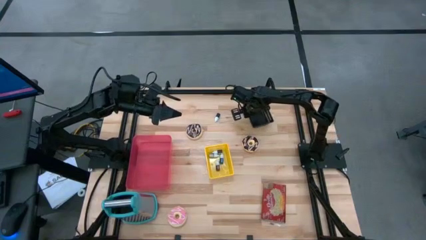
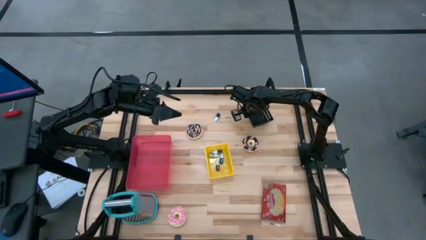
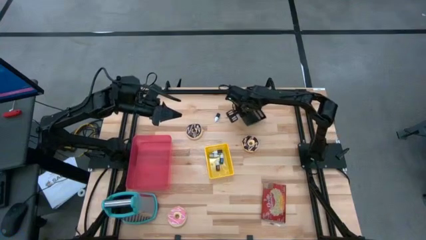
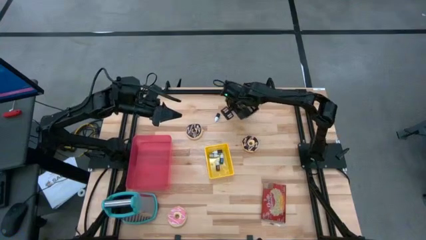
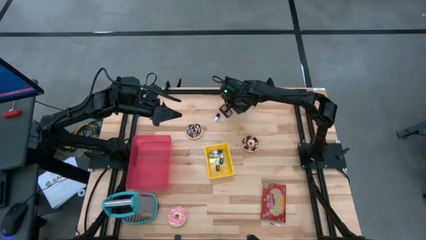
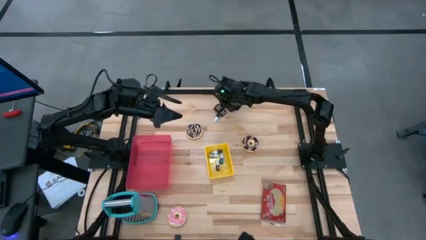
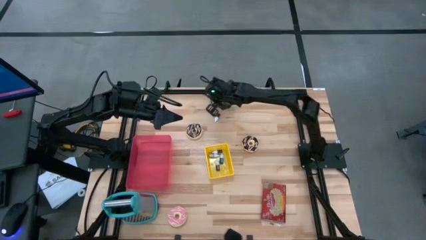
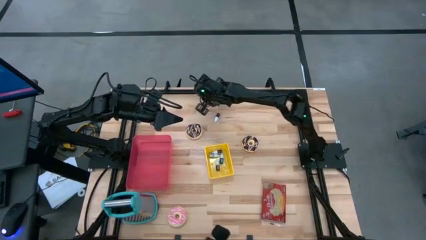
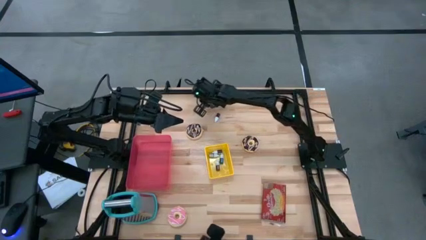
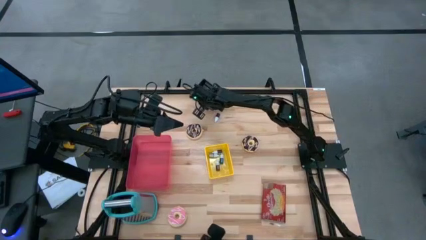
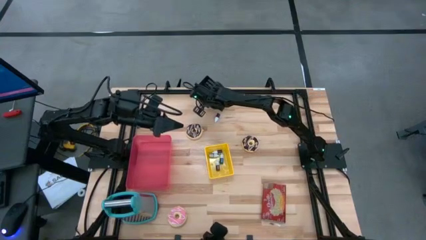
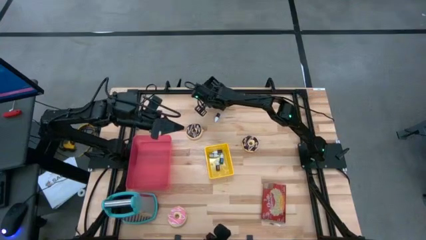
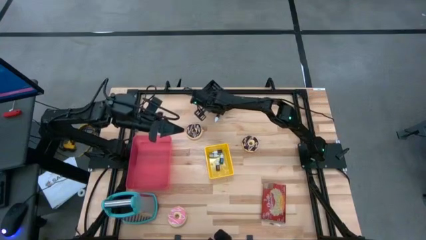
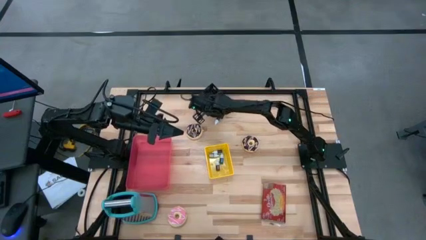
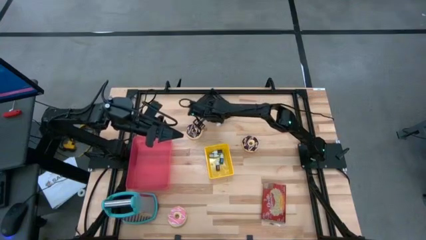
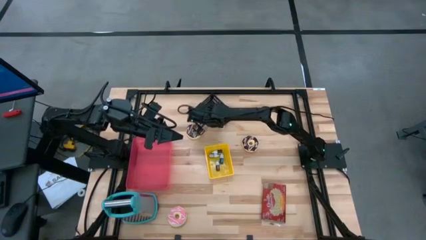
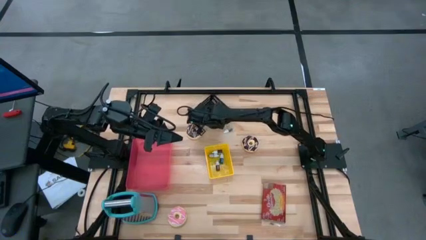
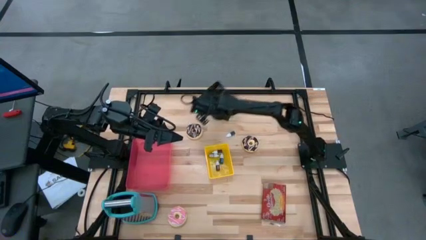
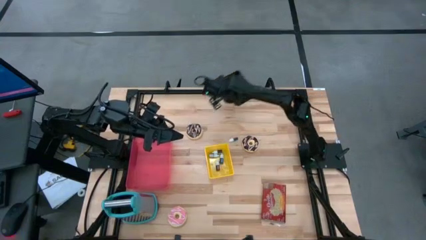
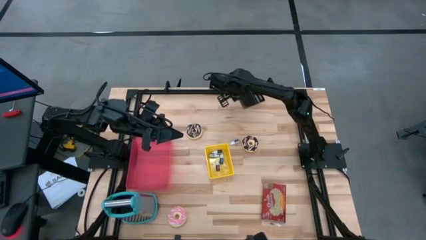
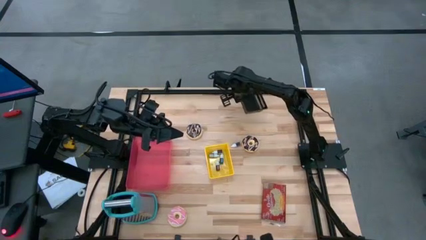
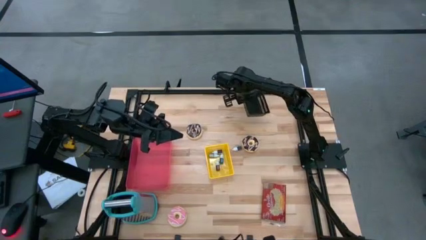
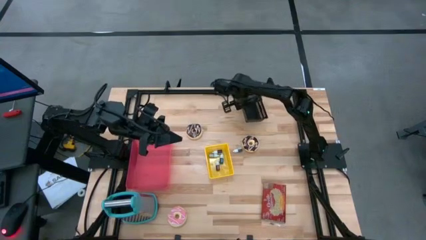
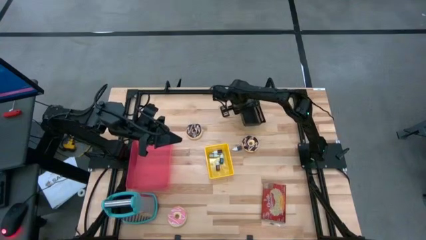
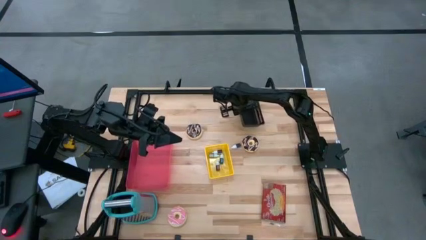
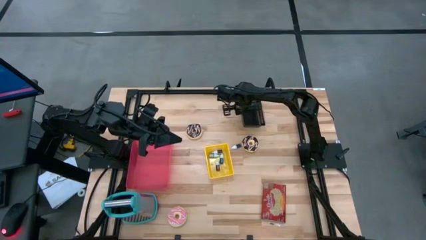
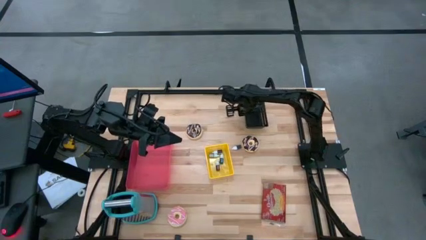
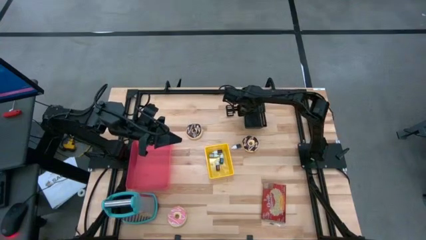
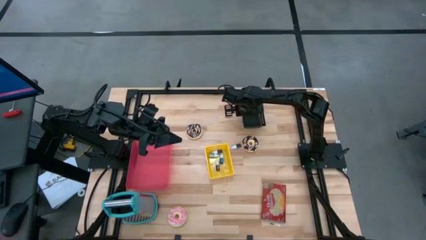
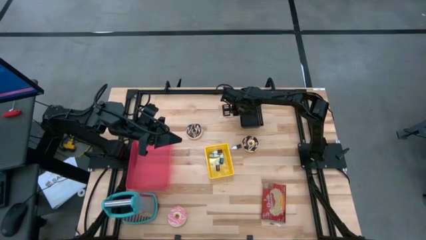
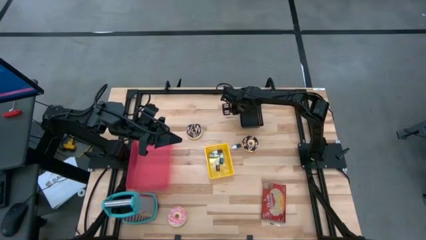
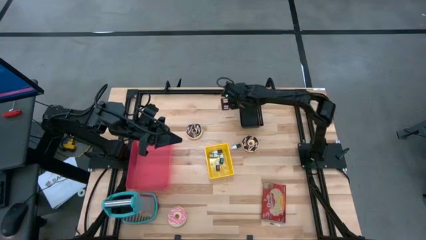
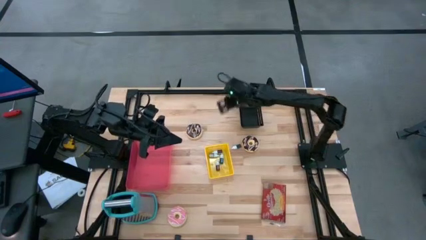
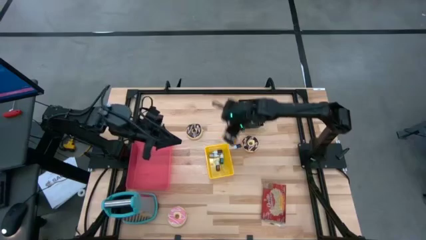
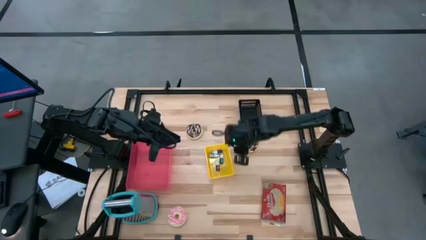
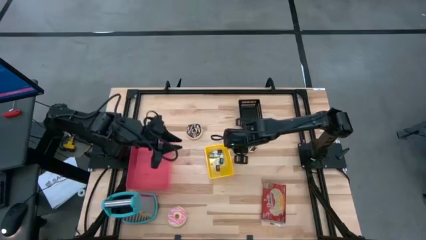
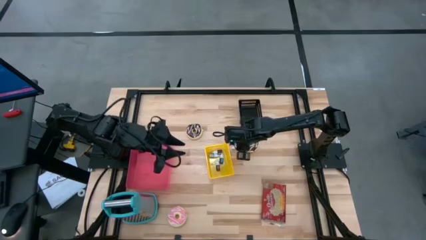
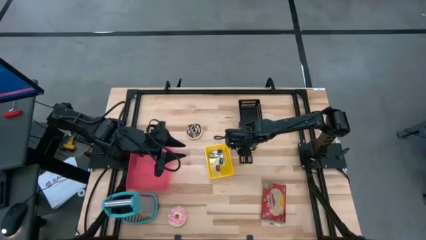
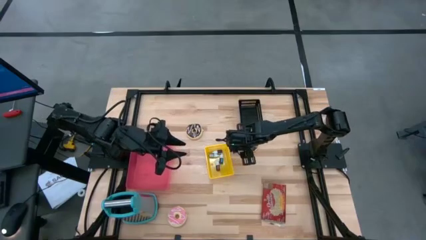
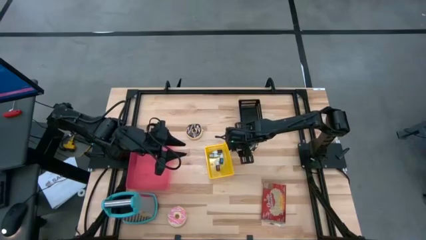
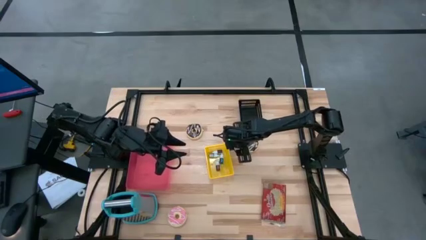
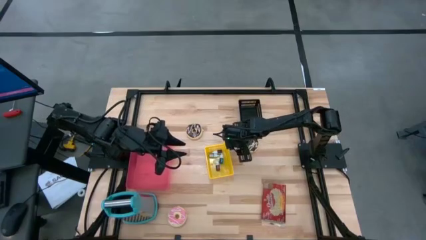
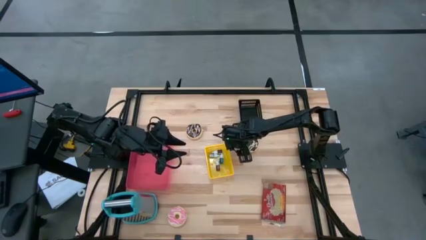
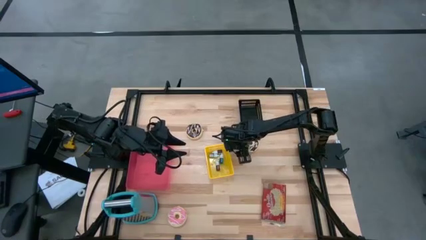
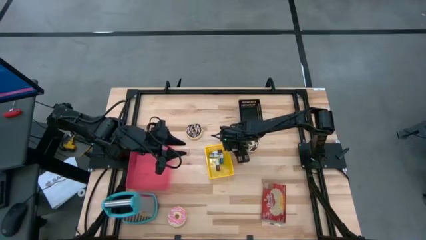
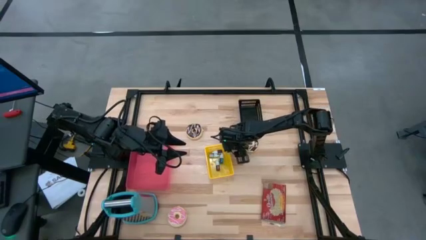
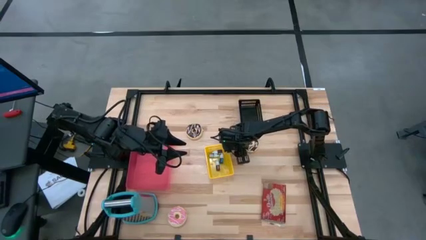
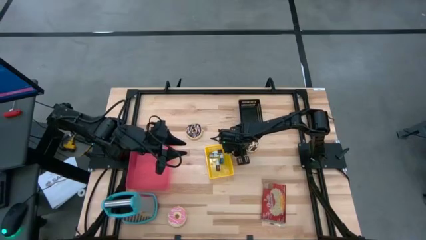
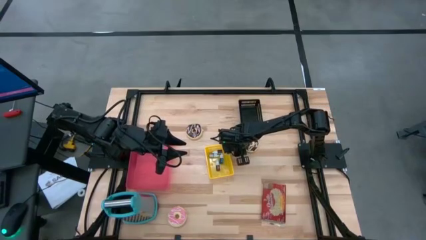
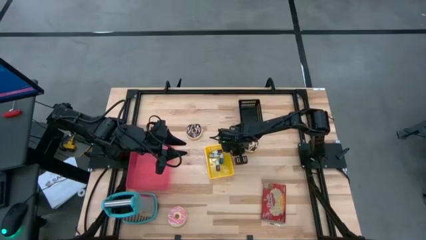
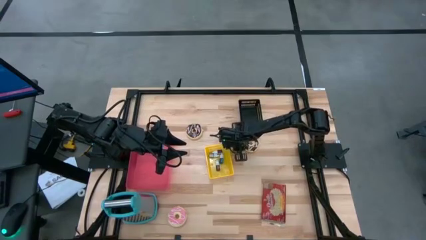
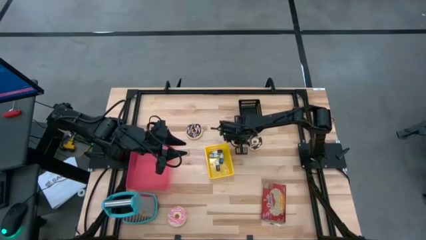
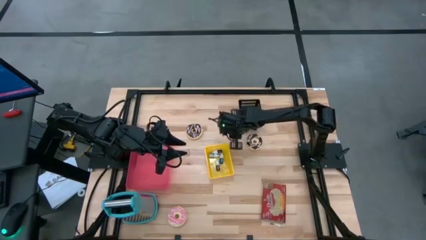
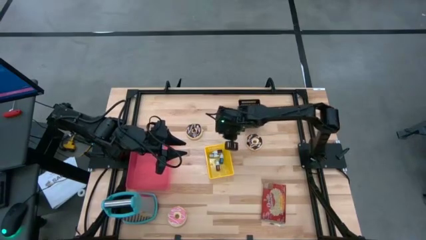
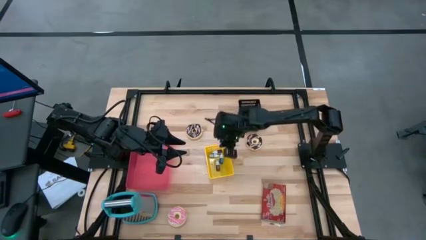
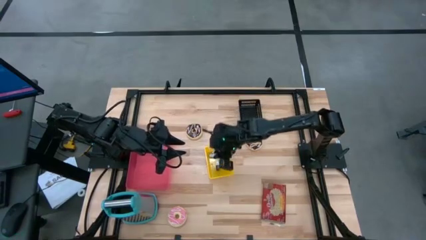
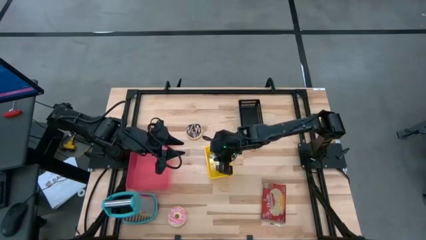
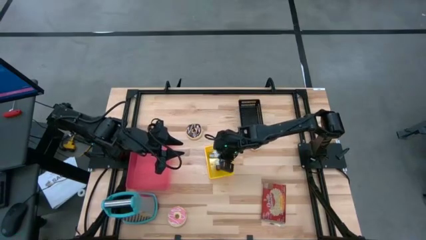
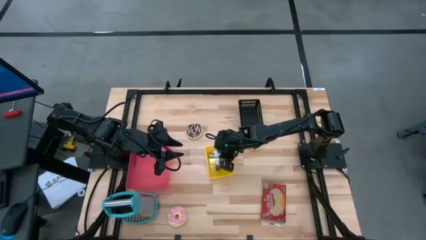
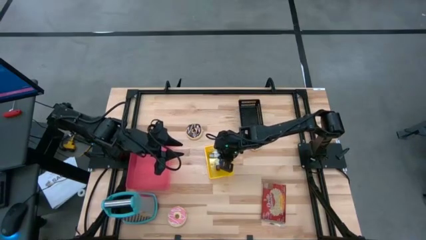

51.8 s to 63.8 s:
Put the black food coloring bottle into the yellow bin

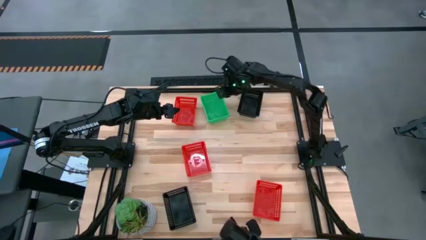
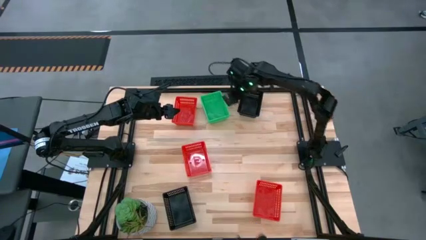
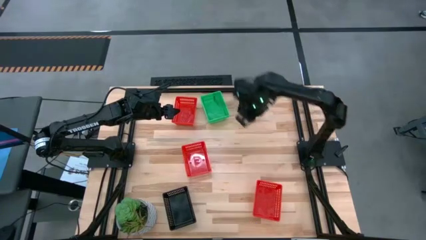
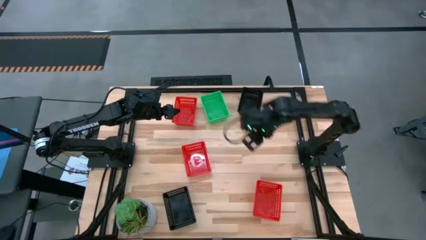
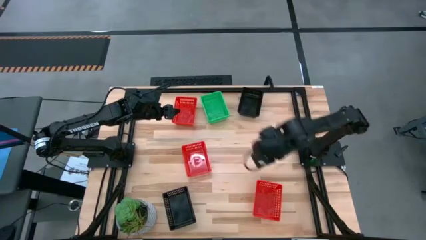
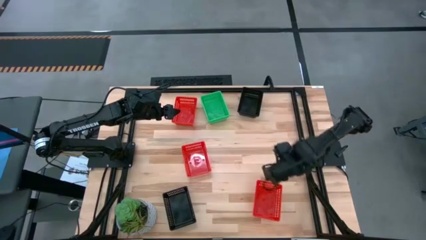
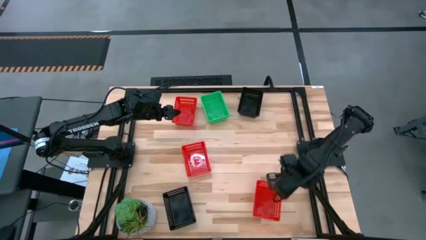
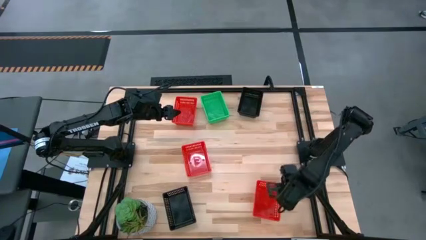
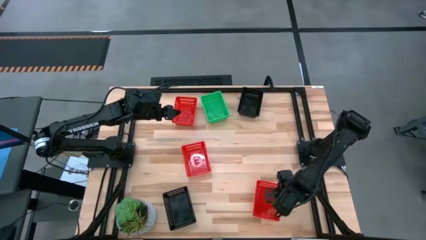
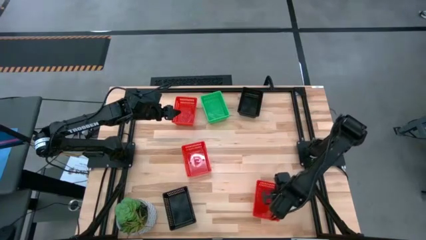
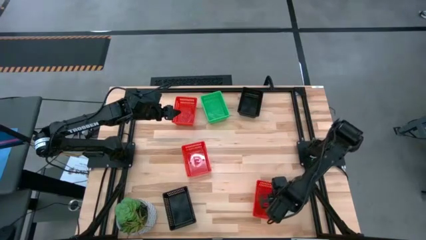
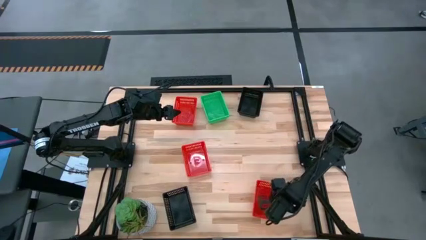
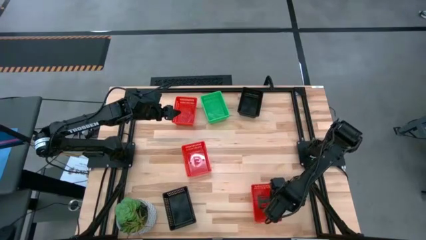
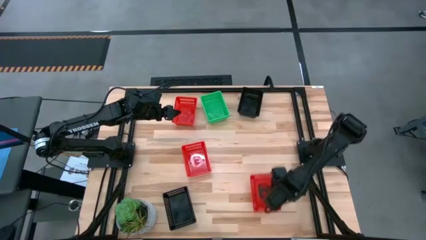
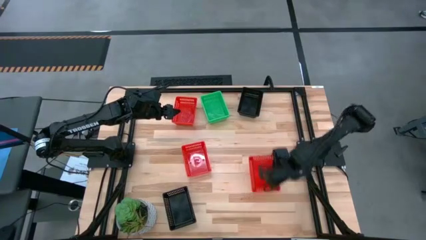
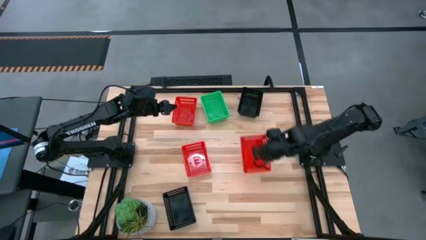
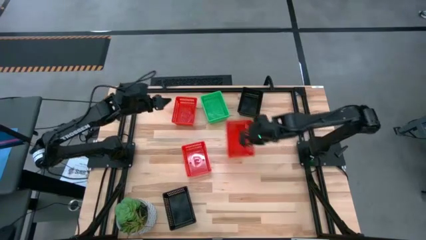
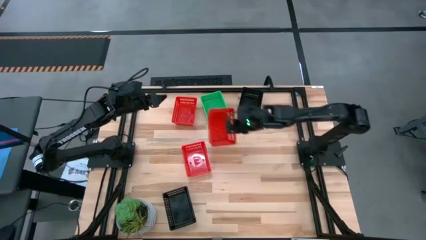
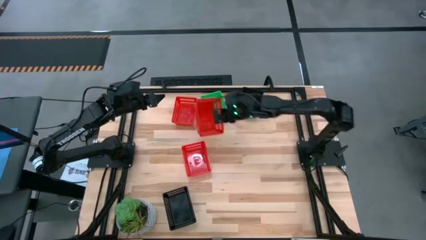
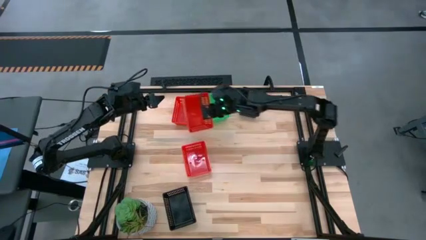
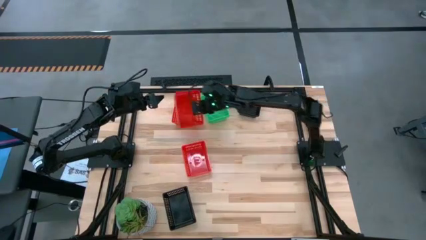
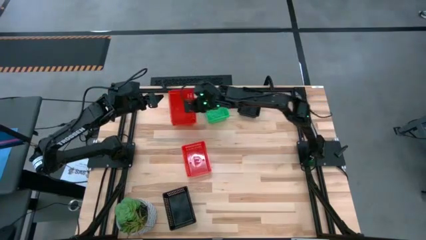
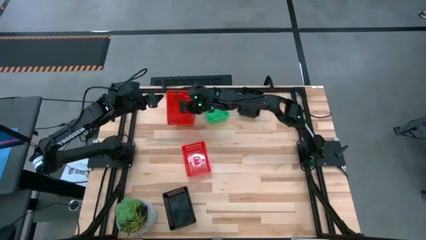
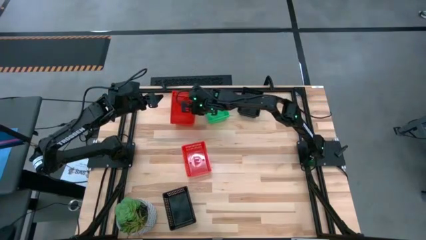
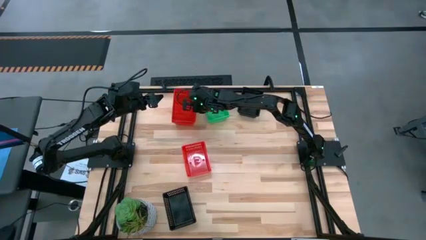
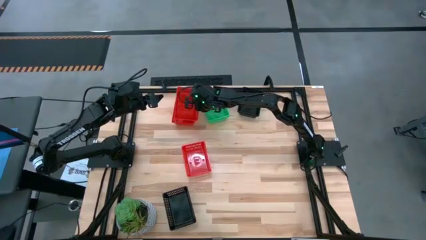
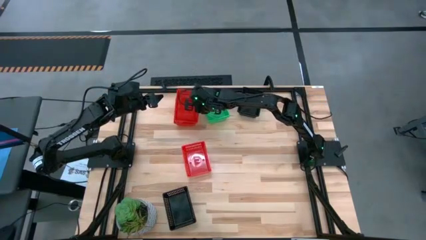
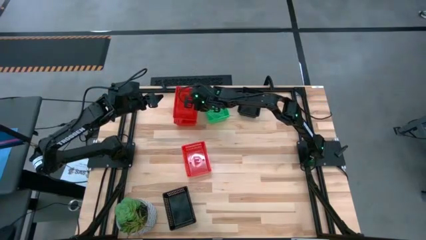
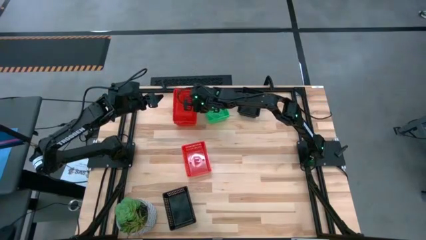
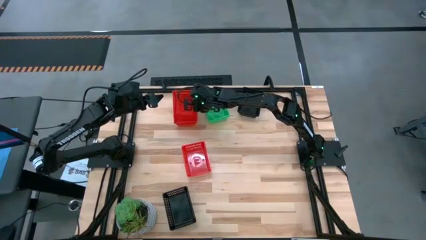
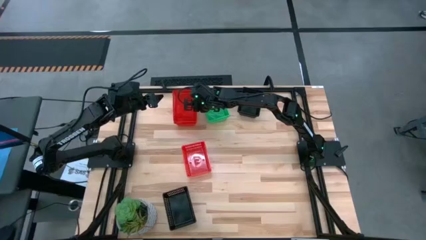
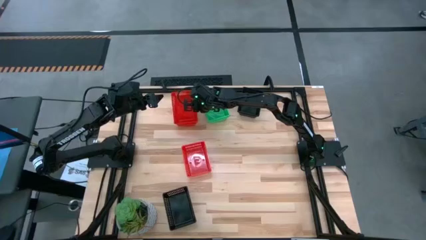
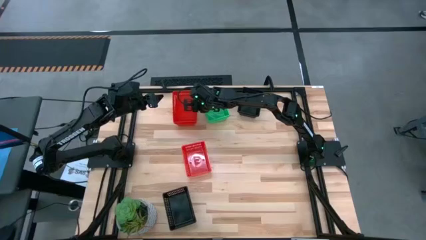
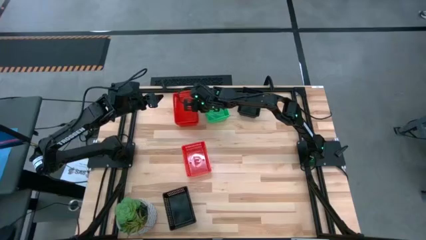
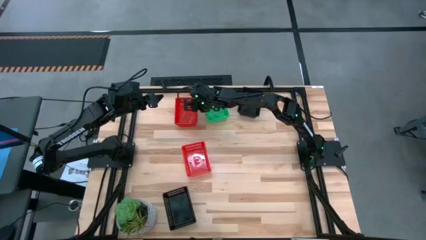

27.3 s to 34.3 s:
Stack the bottom red bin on top of the top red bin
